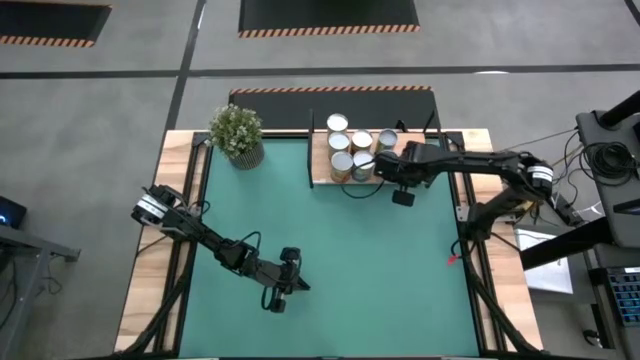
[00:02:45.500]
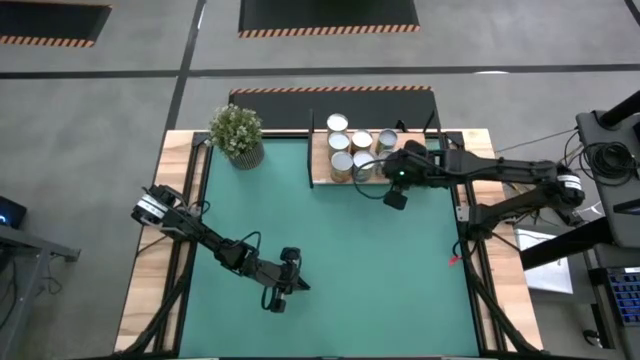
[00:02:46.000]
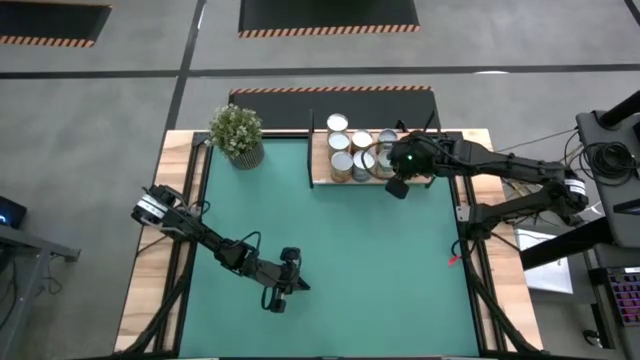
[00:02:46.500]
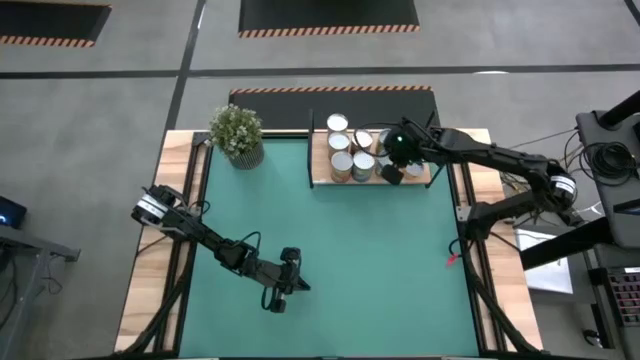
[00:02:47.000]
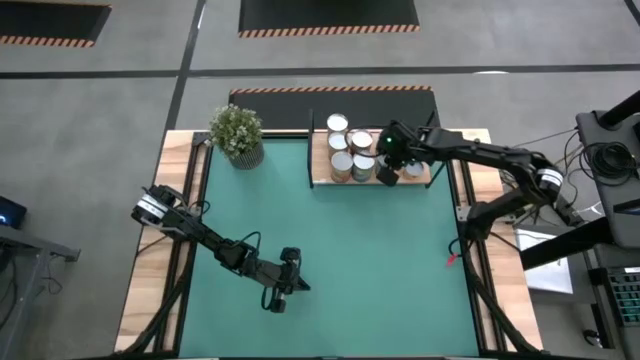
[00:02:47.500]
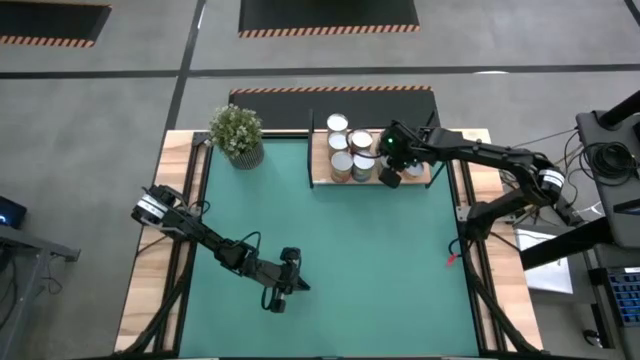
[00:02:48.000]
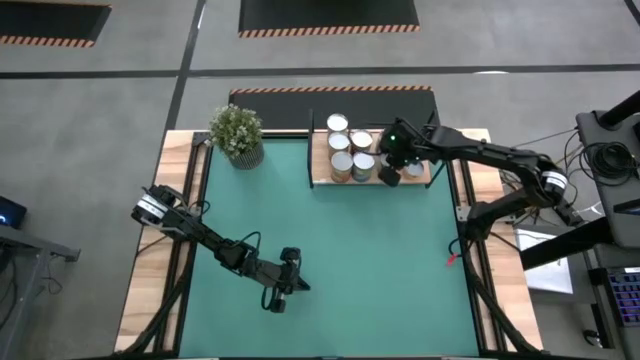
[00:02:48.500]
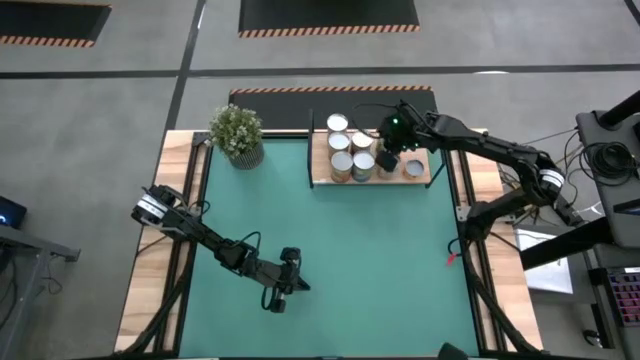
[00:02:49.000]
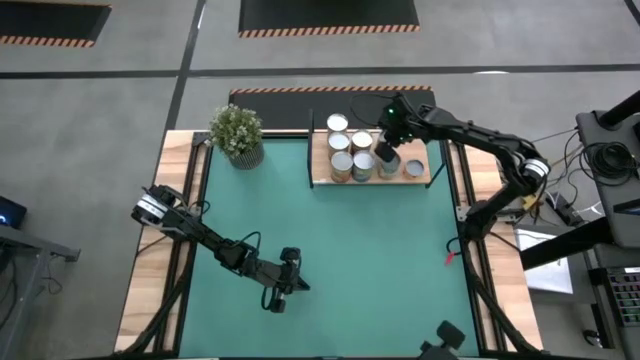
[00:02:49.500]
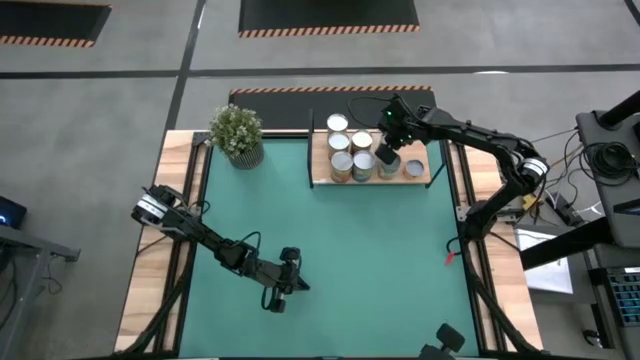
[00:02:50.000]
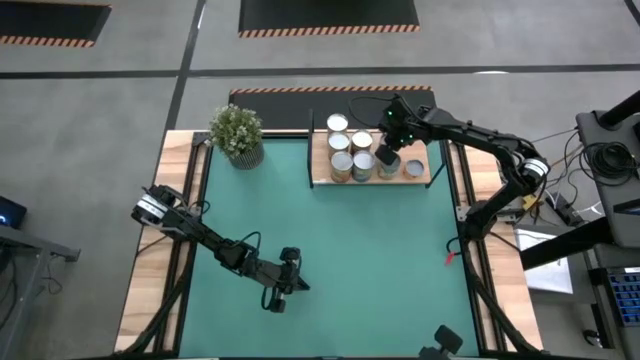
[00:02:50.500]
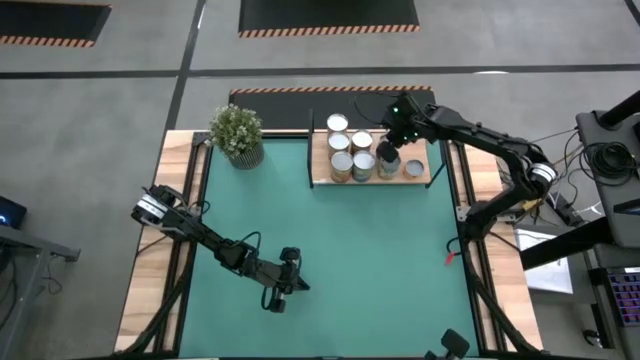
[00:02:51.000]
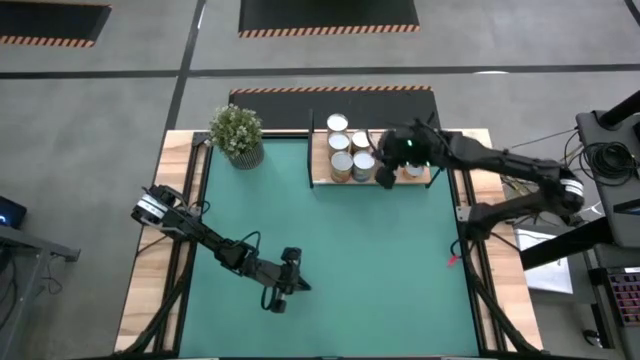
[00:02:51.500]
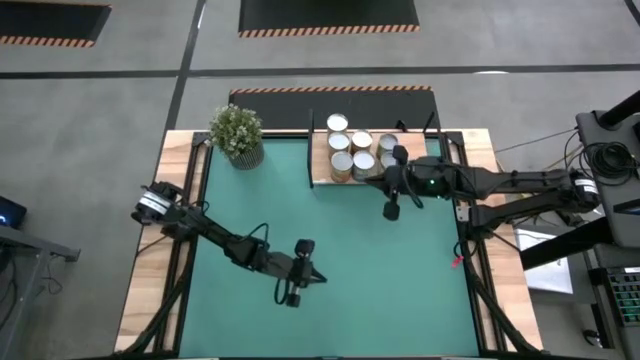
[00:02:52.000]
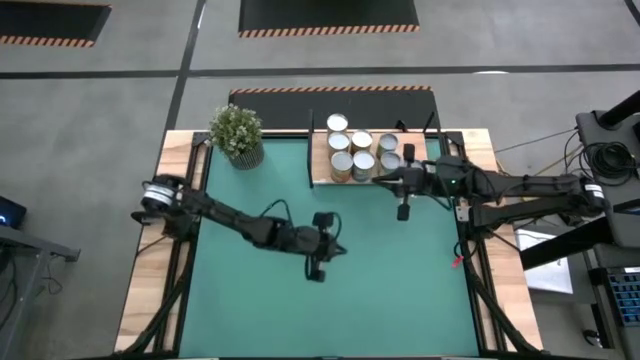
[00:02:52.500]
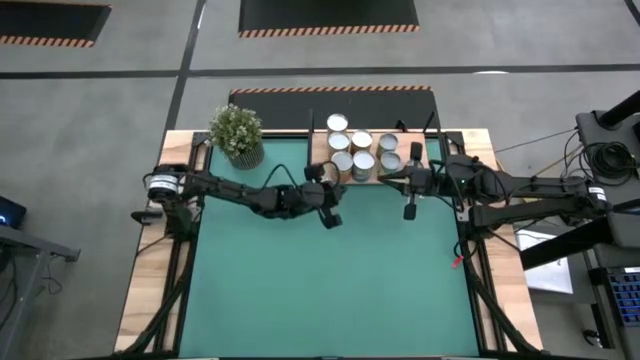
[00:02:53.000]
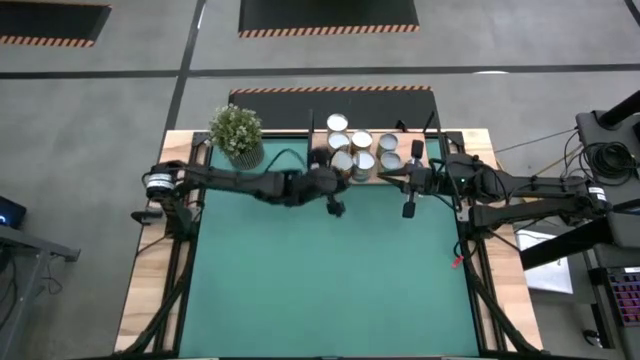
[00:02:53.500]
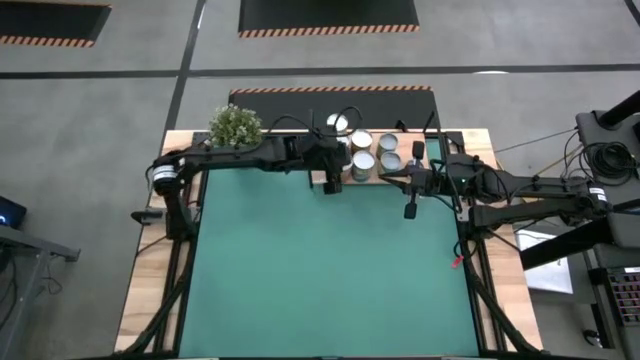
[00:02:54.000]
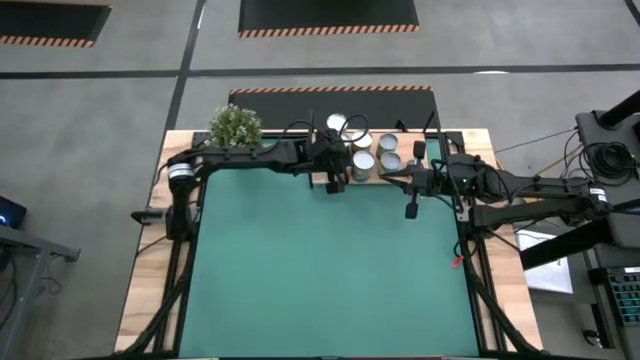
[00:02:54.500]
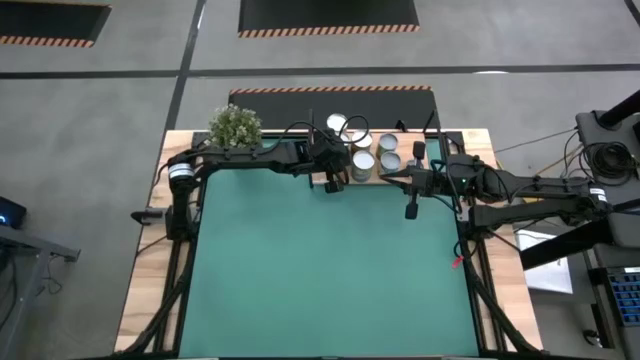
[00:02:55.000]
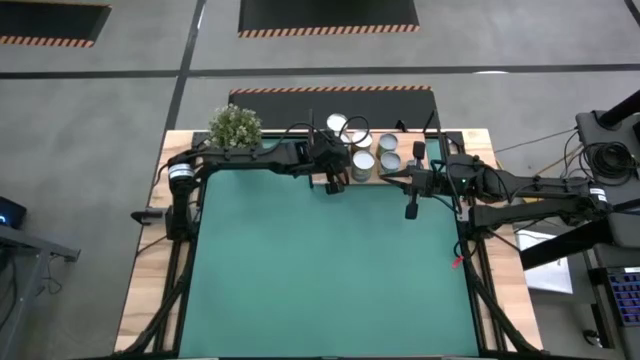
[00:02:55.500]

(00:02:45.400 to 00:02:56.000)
Task: Pick and place cans onto a shelf
Adjust the green can

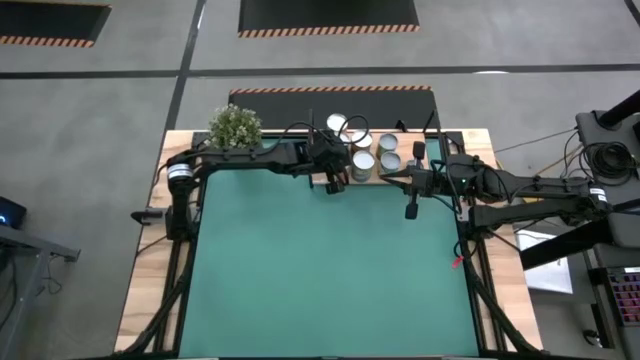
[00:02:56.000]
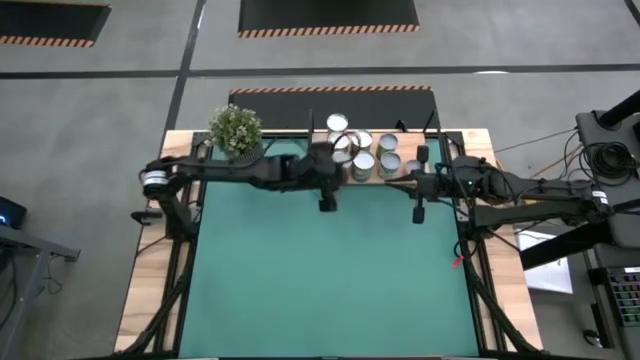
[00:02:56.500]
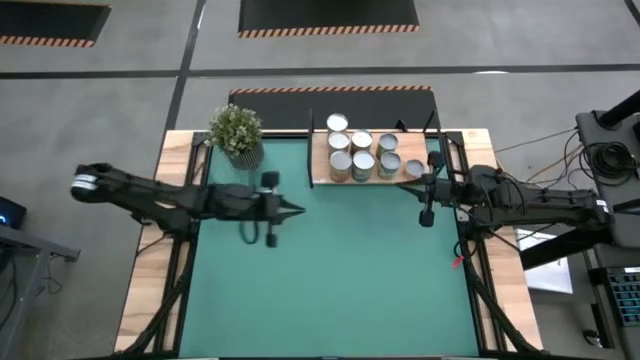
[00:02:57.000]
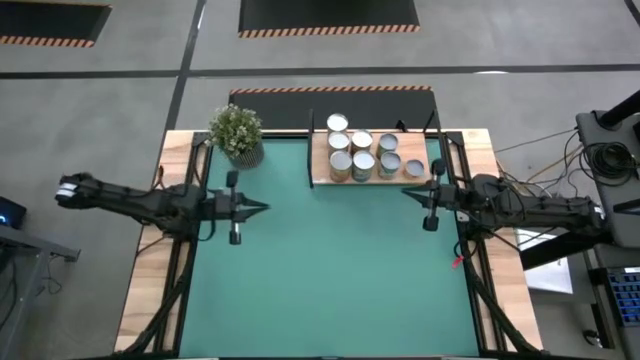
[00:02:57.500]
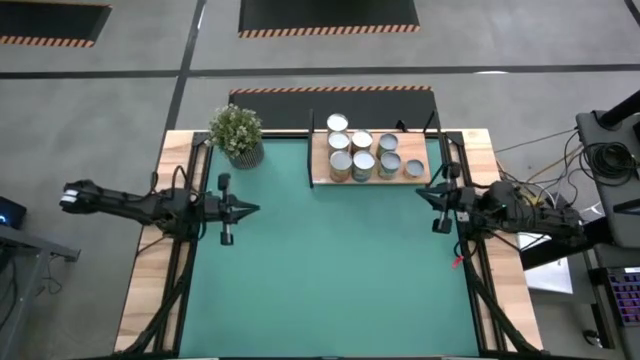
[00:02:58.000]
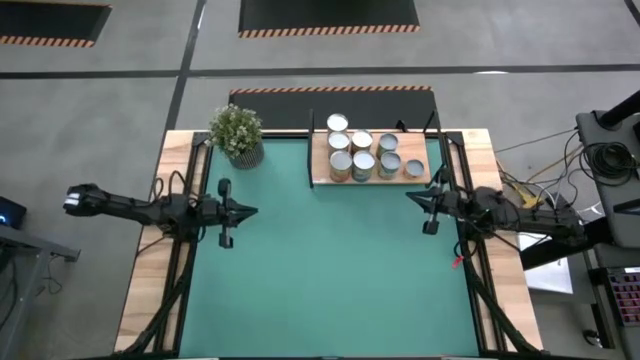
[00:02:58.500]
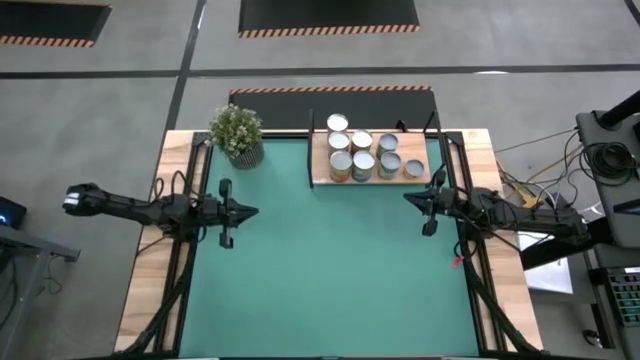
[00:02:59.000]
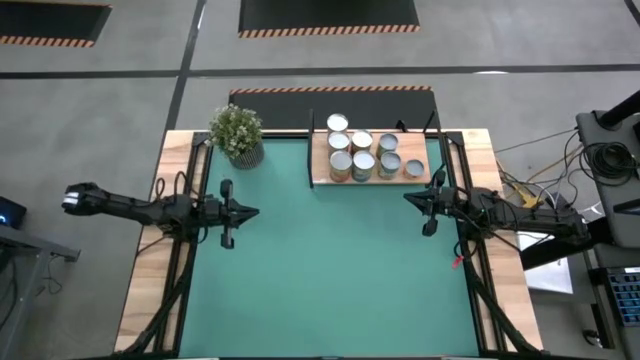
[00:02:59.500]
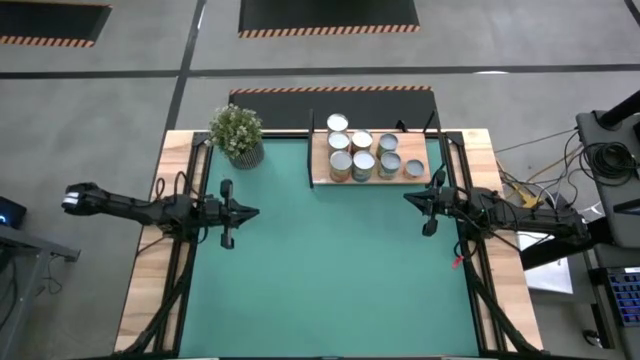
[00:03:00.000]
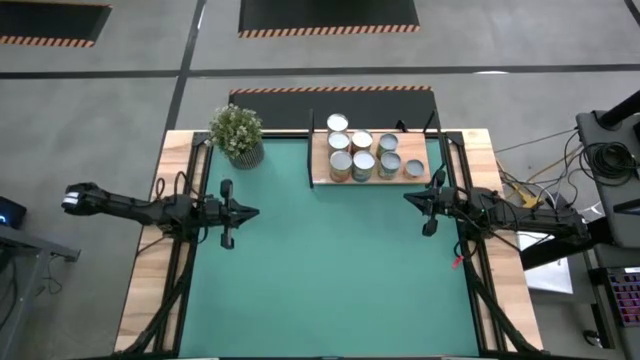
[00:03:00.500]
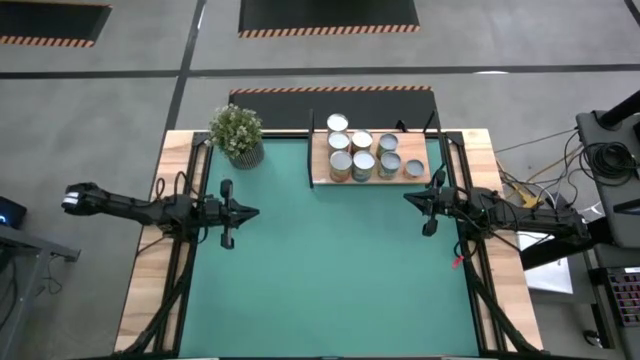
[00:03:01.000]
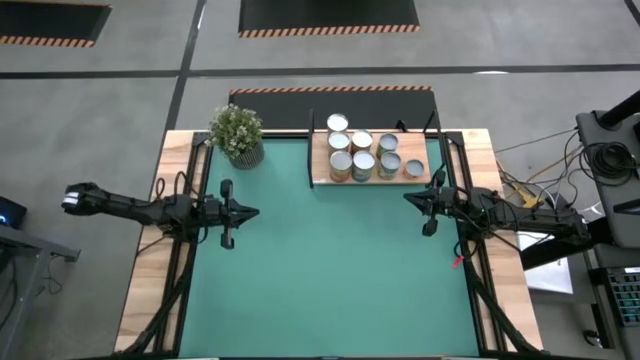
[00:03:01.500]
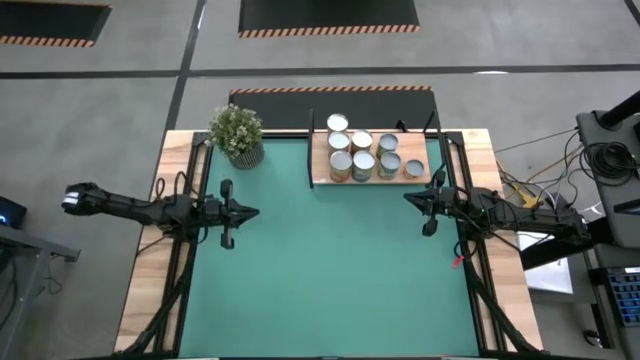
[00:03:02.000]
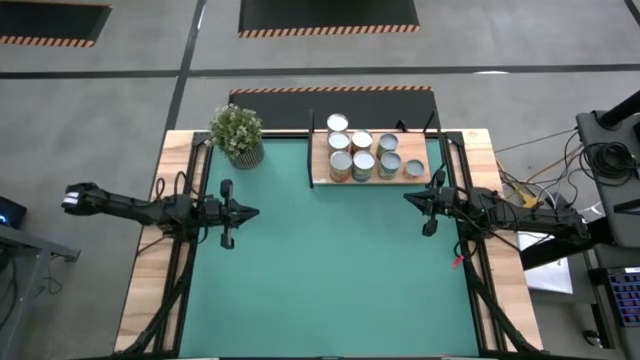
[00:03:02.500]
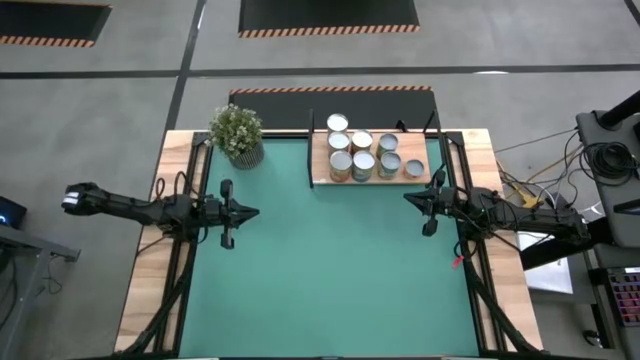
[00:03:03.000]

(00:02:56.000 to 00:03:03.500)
Return to Home Position

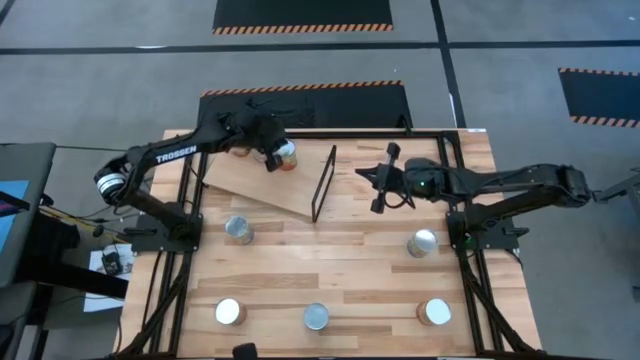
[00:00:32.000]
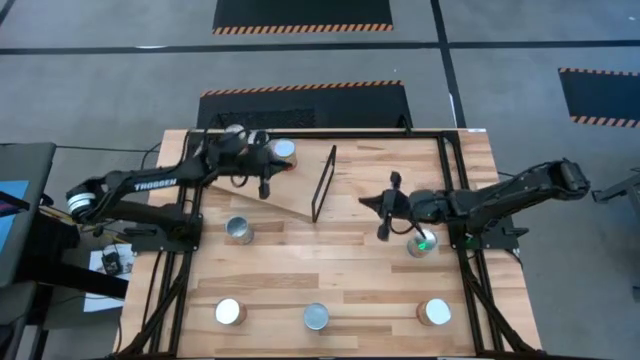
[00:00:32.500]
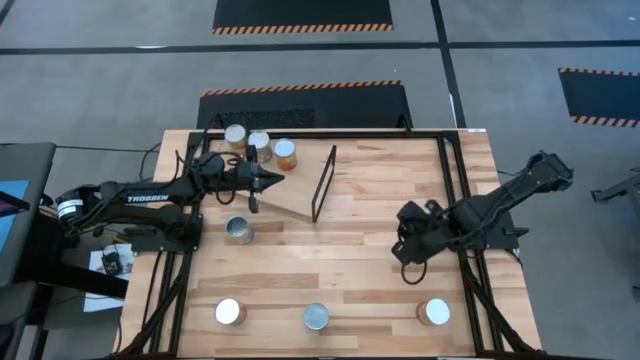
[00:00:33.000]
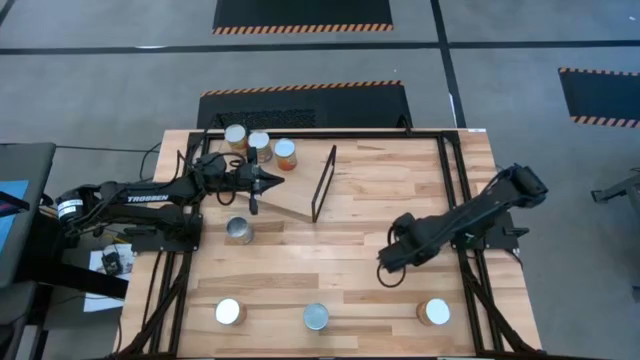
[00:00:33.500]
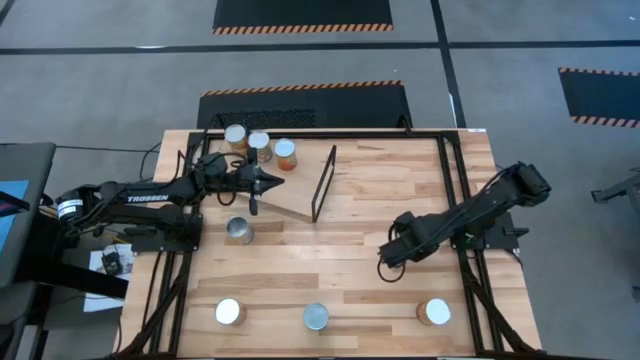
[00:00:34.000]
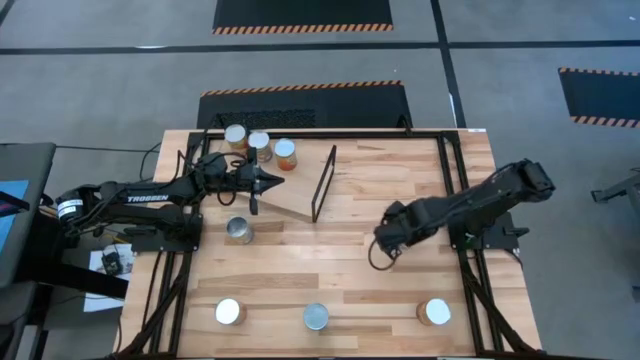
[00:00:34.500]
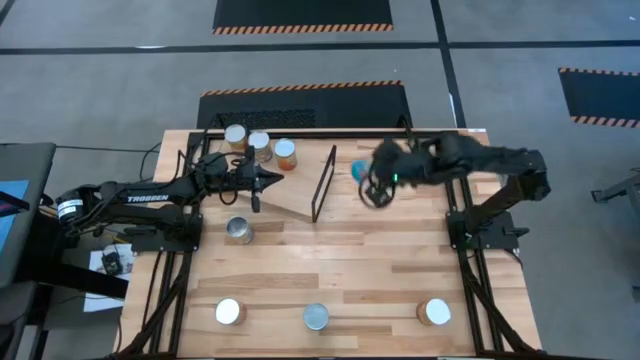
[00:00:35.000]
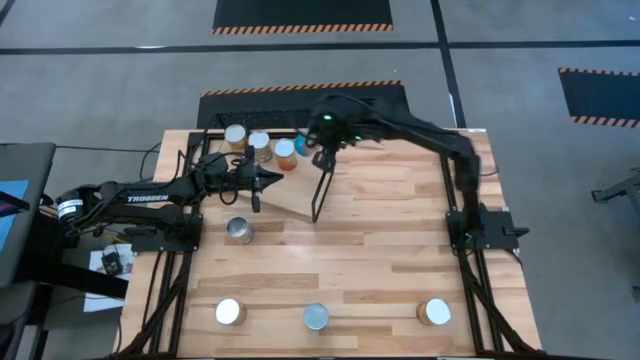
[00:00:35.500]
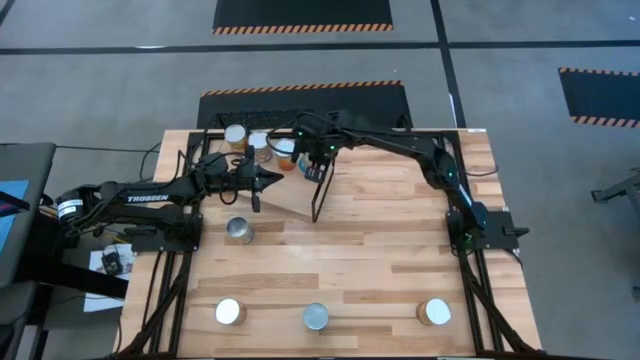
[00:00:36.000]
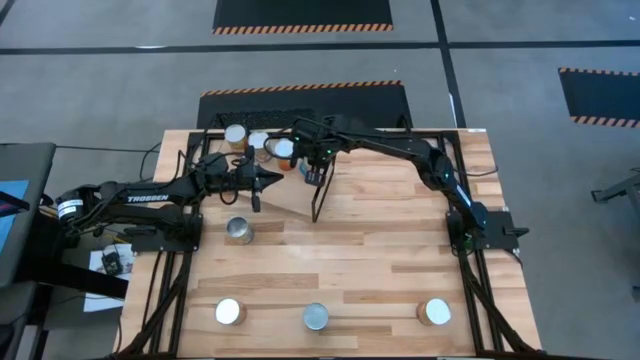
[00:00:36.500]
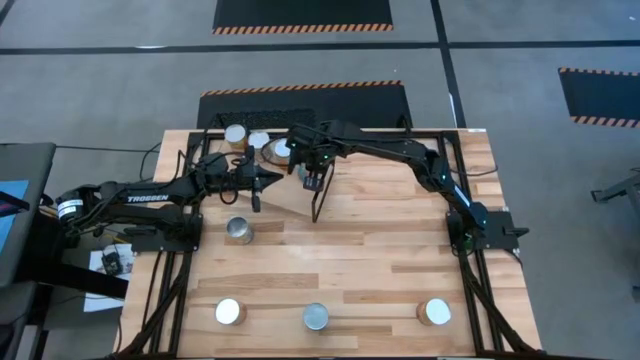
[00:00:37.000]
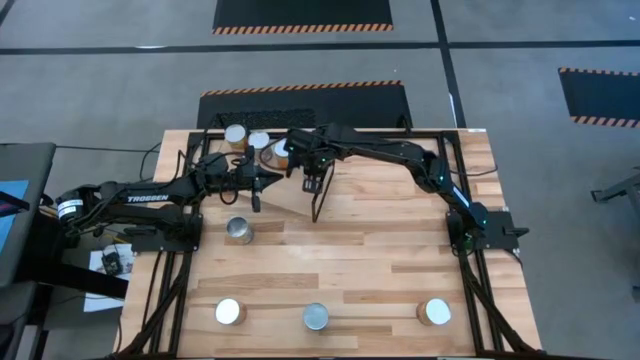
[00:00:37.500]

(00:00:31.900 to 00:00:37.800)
Task: Pick and place cans onto a shelf
Put the top canned tomatoes on the shelf
